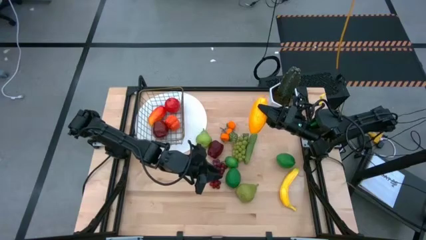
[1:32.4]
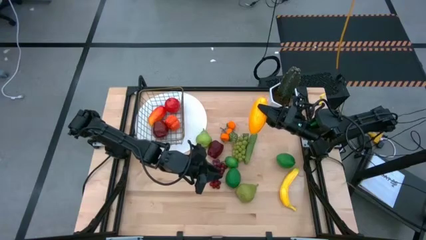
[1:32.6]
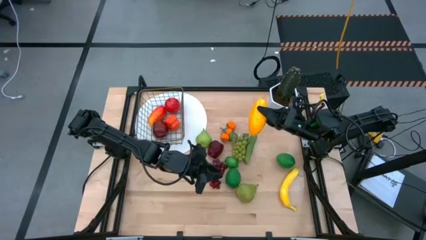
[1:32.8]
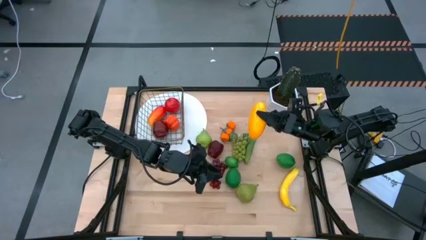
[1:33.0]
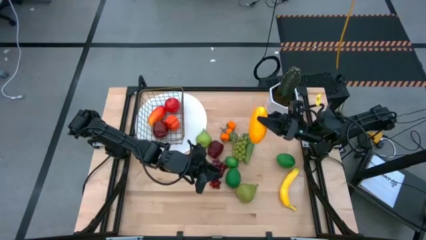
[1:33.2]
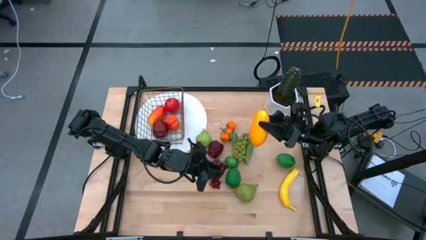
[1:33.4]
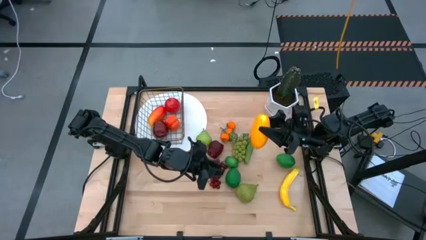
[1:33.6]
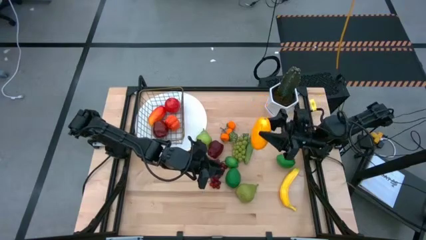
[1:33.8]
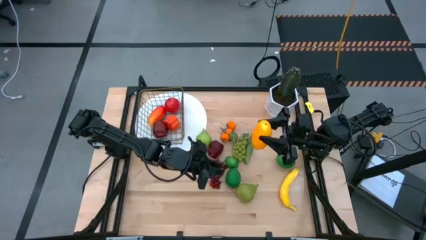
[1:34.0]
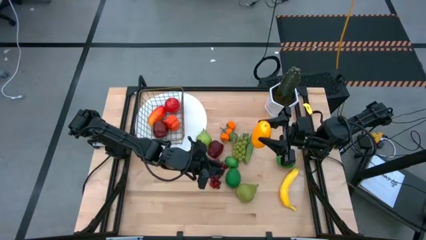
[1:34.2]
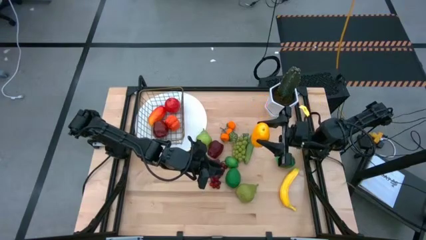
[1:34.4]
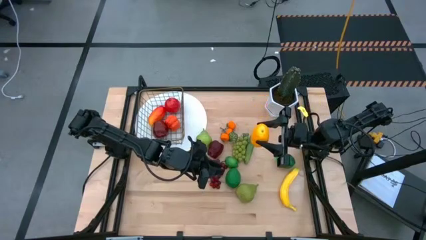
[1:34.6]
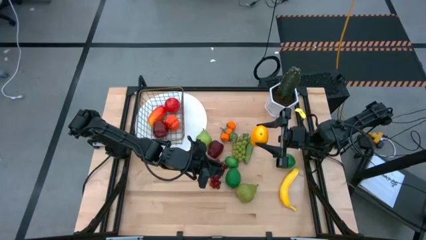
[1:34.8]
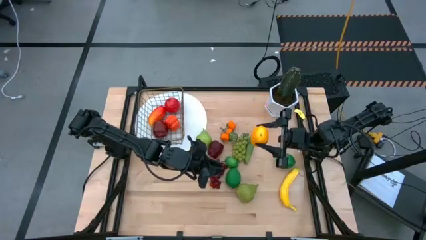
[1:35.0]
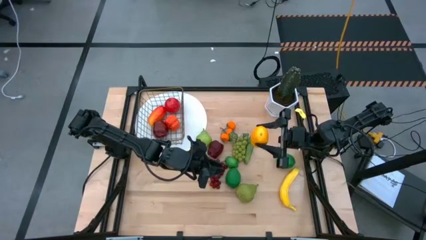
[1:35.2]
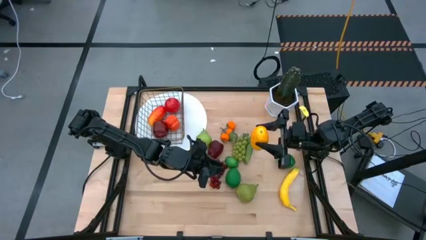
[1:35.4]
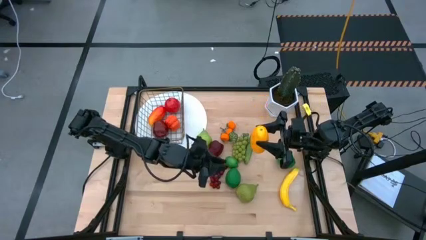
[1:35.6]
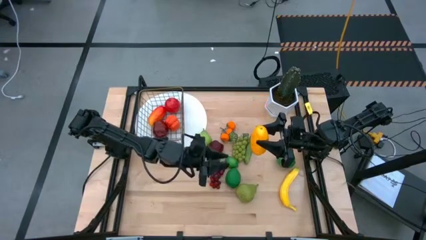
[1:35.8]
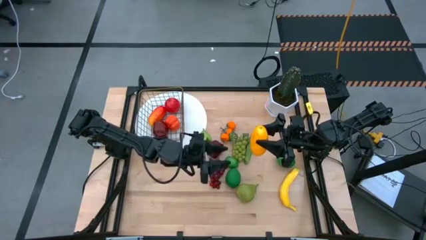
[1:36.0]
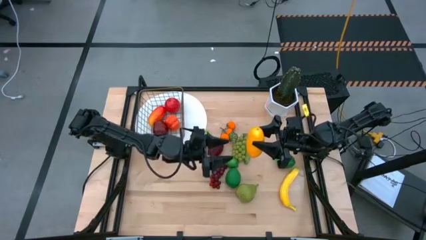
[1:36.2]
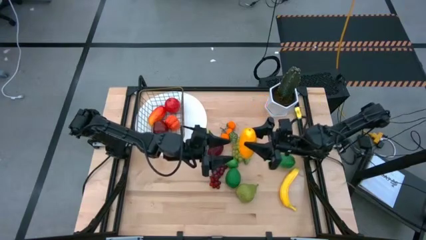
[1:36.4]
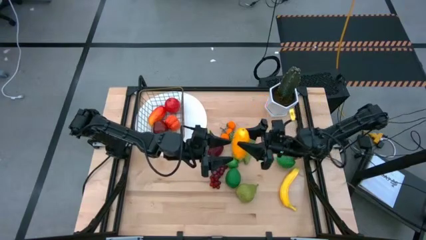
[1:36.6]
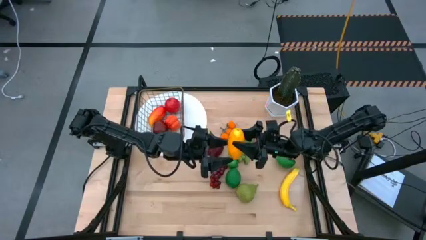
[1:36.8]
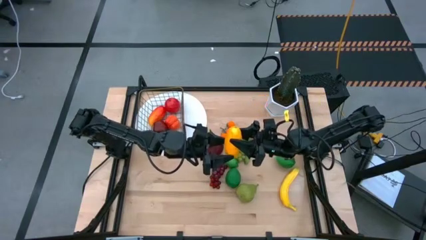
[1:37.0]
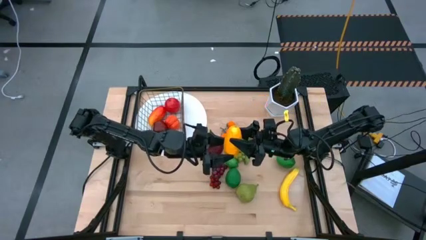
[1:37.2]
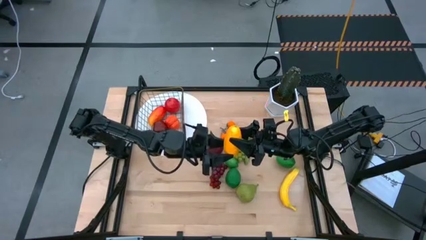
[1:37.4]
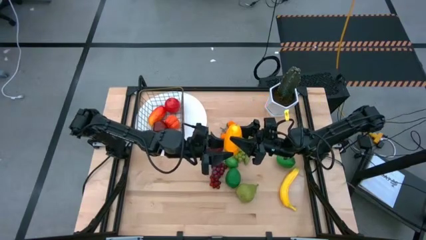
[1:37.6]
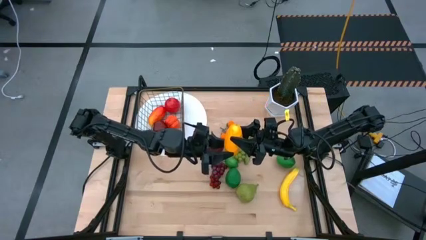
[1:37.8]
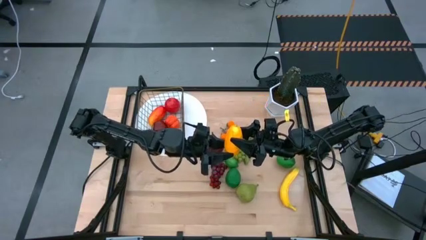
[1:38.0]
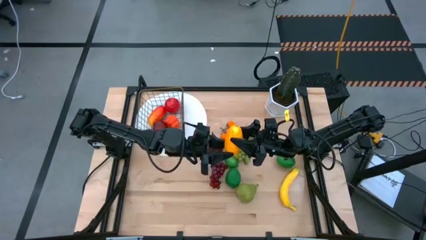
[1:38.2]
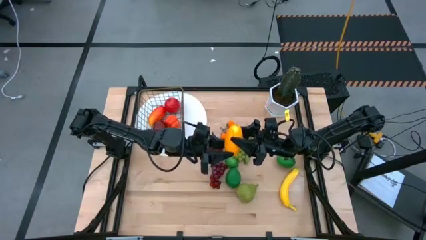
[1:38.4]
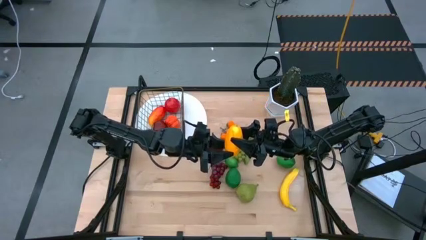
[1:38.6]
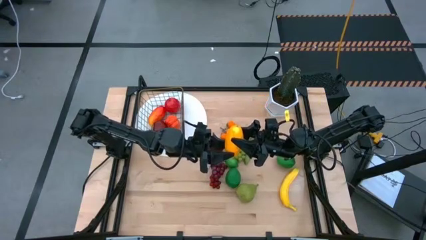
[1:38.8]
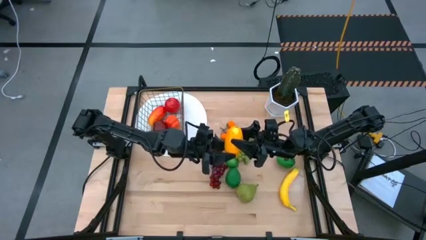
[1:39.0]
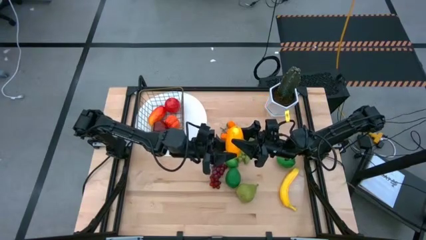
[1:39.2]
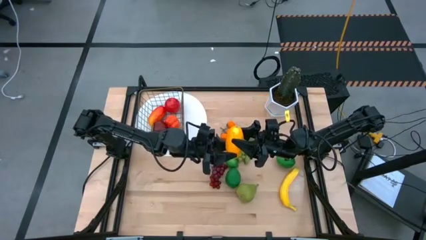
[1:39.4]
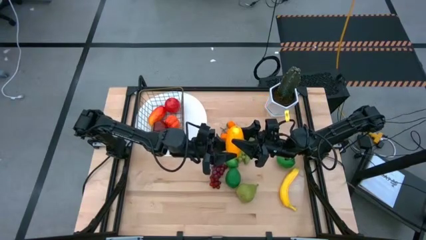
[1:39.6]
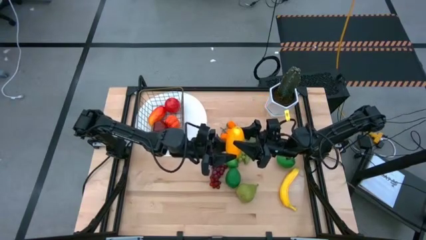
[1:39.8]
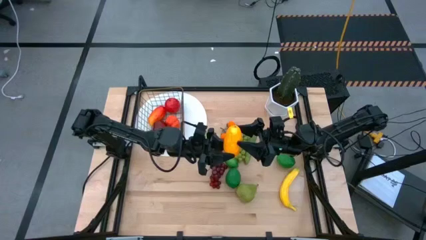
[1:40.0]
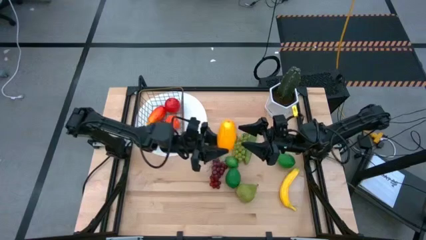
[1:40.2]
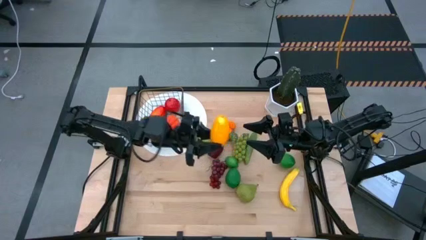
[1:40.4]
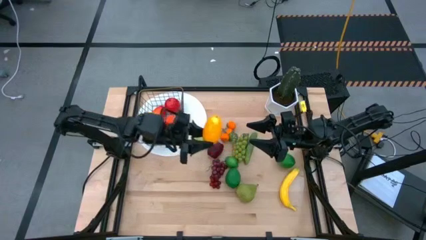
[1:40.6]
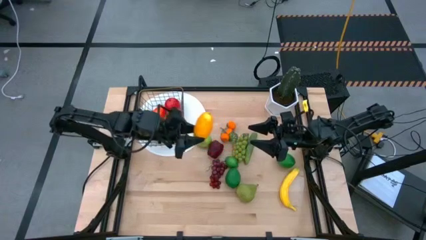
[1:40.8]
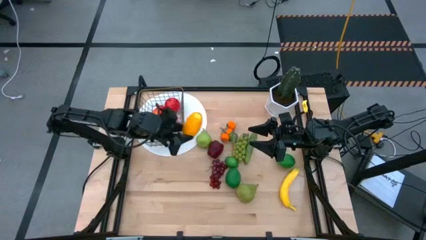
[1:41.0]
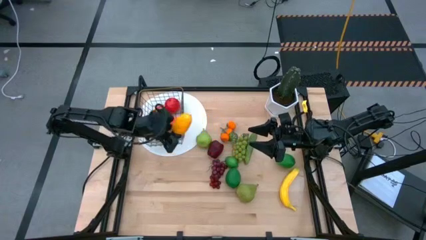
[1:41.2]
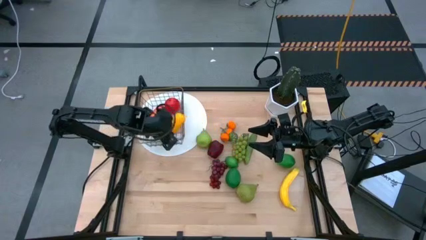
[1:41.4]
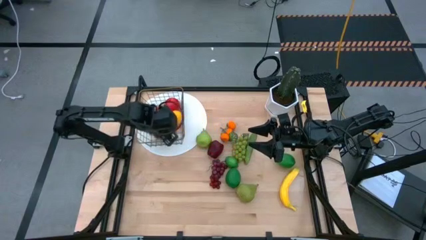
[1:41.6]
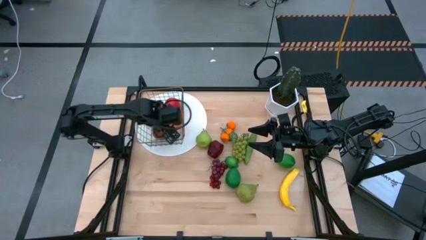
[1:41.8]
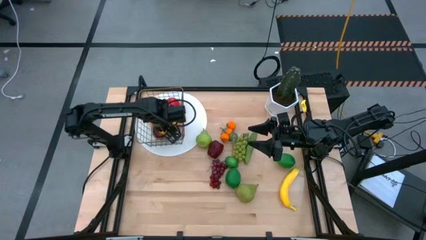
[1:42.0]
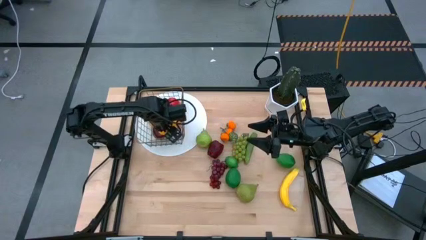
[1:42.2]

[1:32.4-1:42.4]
Task: Build produce basket
Put the yellow mango into the wire basket

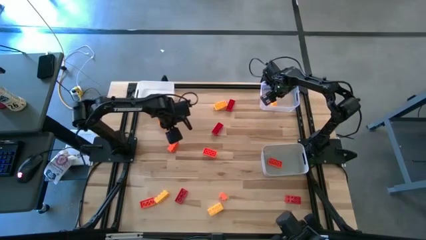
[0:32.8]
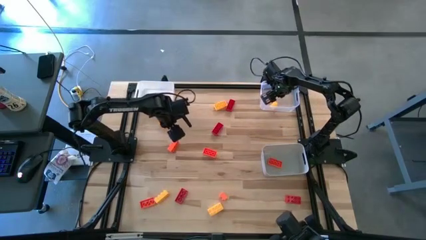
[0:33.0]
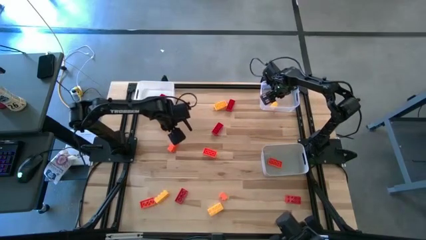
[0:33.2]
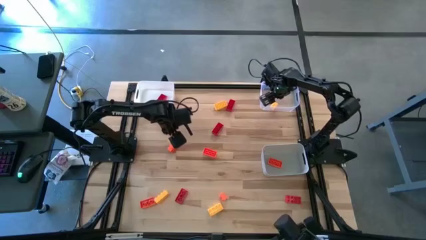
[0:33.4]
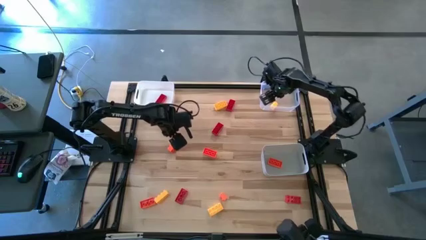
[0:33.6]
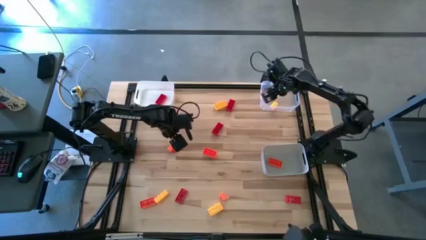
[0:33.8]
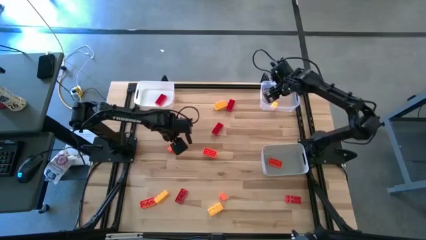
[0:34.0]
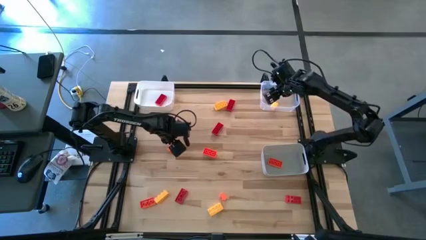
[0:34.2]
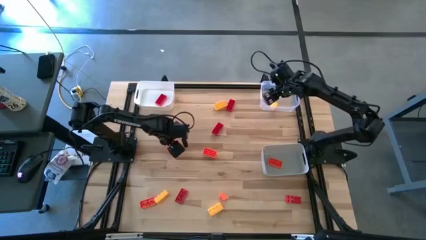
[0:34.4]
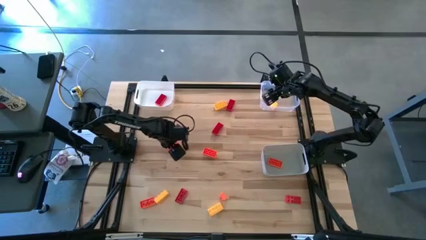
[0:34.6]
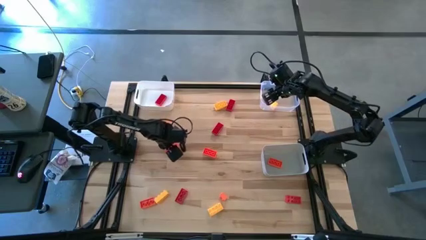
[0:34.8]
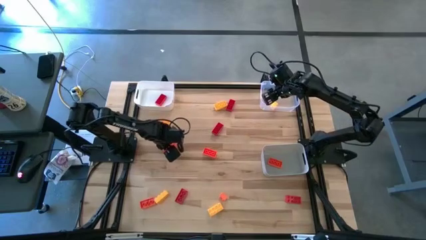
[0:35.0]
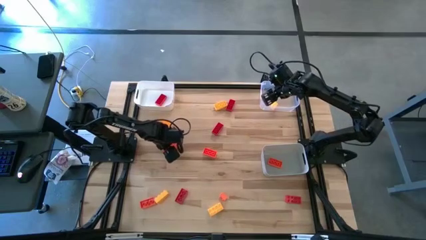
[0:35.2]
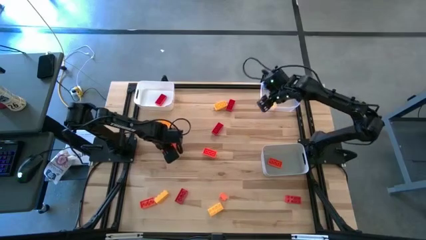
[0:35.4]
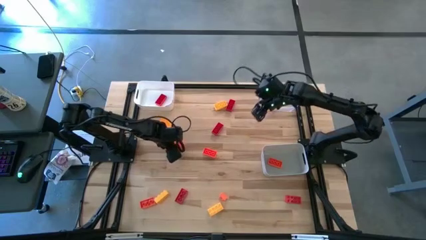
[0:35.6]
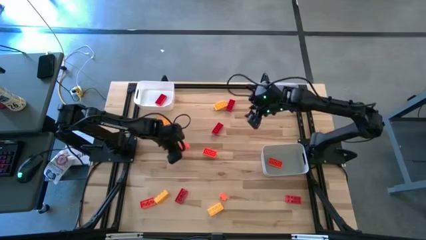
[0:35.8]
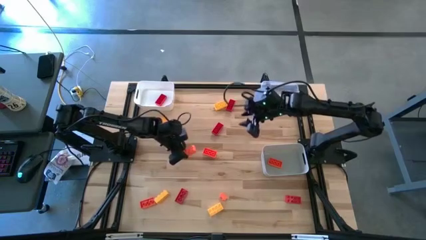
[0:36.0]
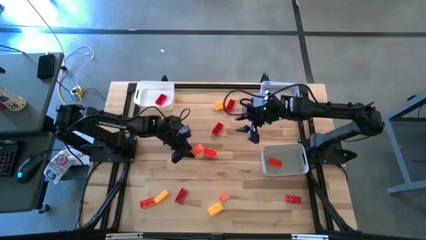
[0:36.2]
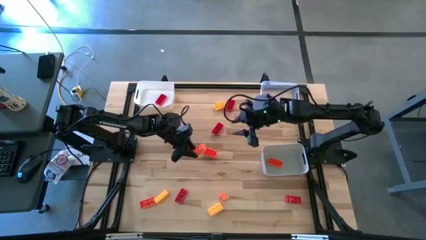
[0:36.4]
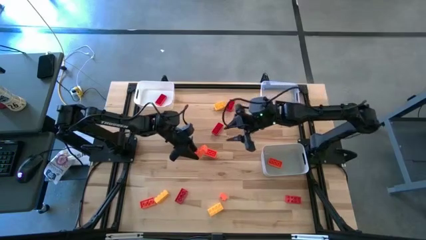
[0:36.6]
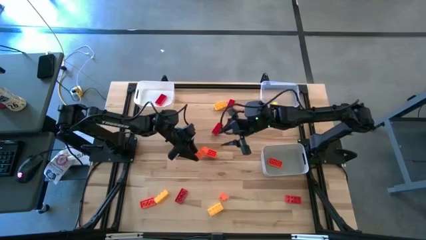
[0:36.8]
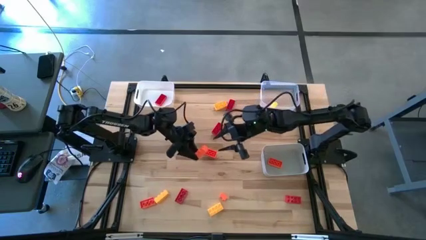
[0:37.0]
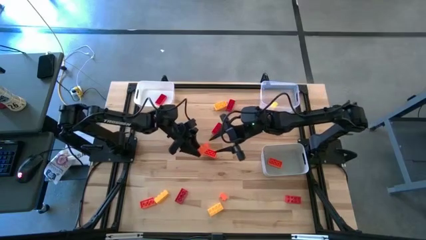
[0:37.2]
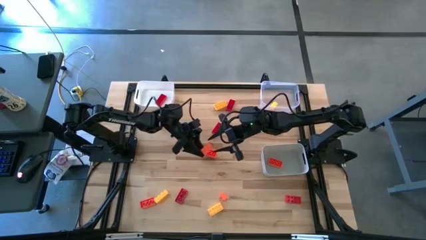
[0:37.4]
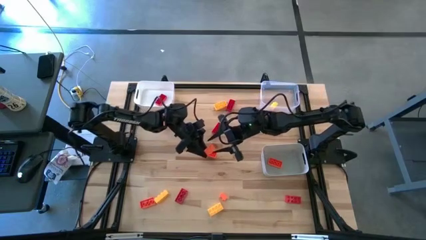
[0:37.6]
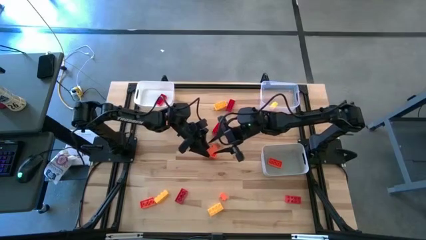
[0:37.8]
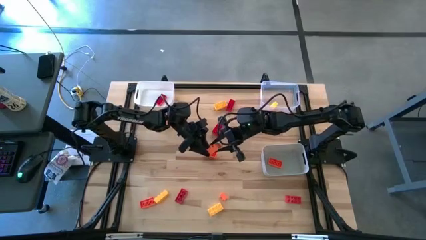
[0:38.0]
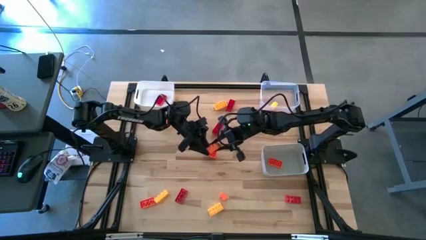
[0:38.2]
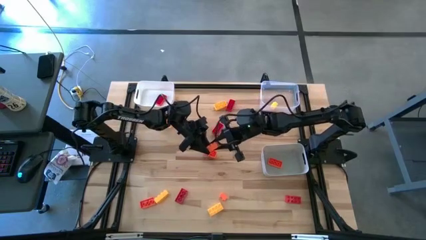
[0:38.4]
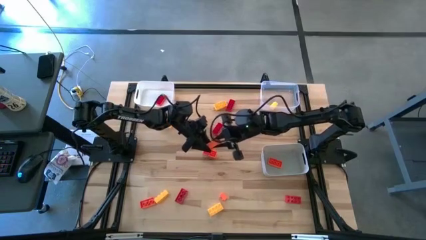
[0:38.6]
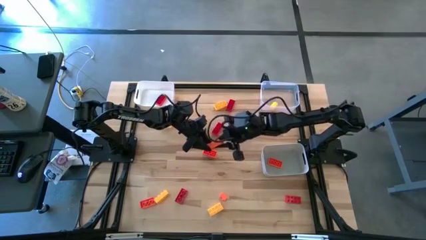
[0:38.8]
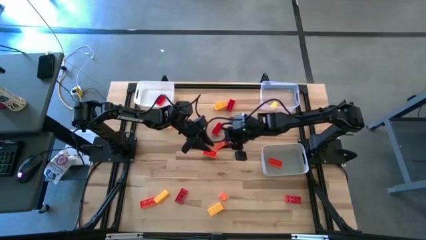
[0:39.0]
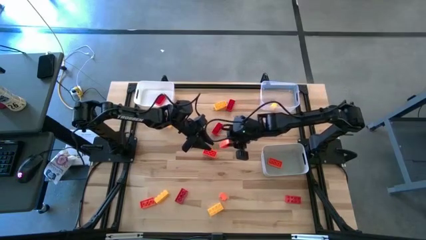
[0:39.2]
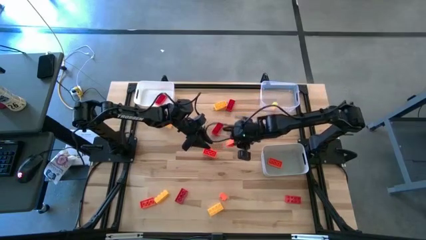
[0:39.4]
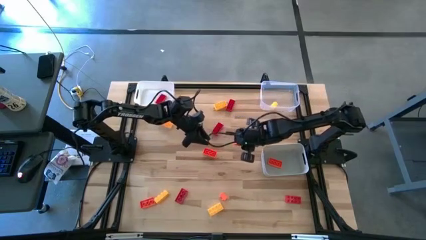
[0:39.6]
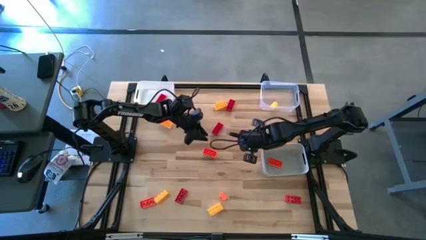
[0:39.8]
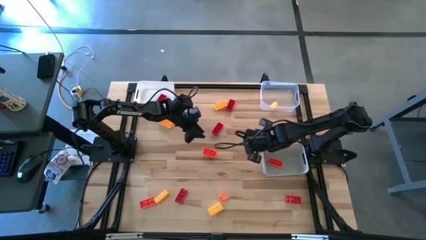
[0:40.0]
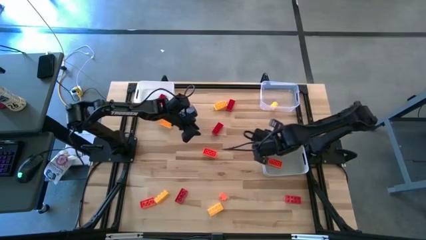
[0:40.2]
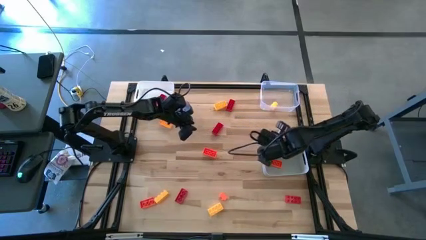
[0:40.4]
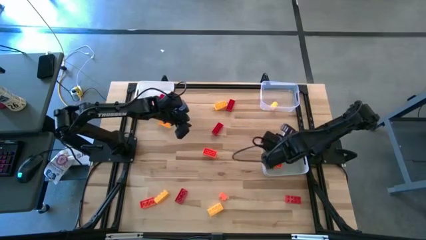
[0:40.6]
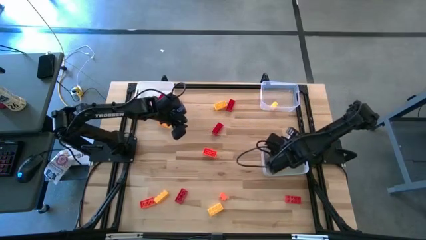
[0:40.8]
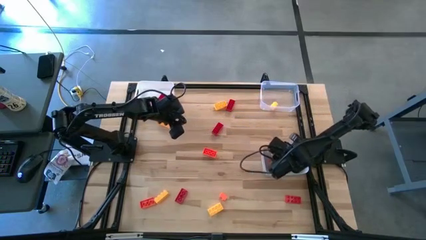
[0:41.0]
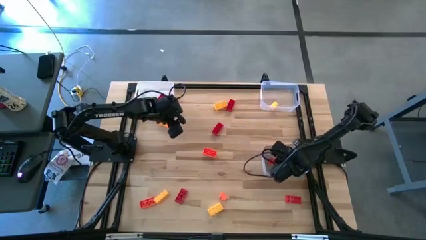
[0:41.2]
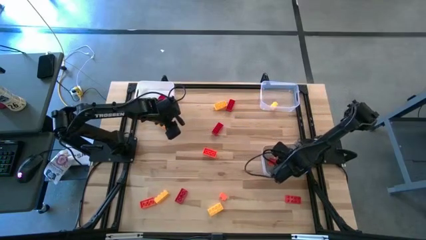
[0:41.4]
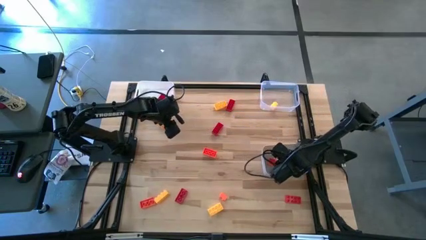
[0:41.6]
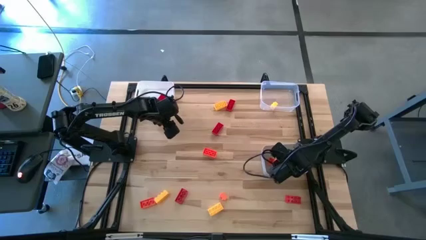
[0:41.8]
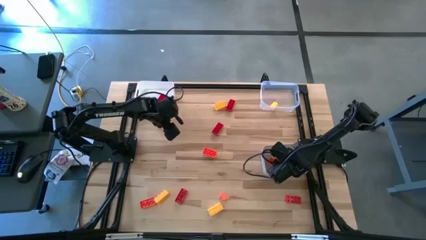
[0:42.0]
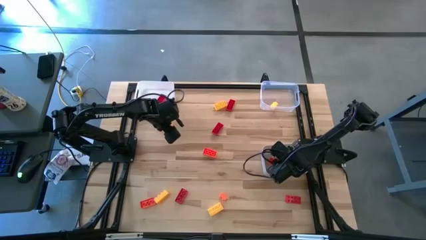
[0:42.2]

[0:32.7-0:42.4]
Task: Sort & place blocks by color
Put the orange game piece into the gray bin
